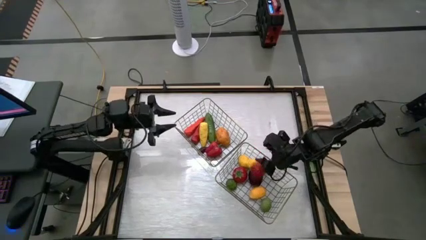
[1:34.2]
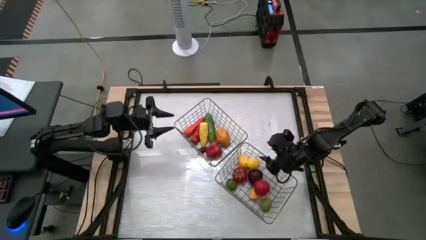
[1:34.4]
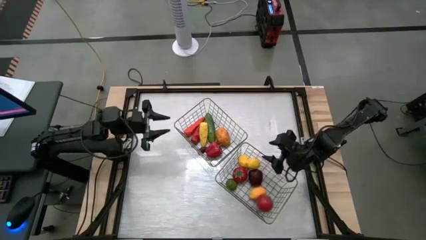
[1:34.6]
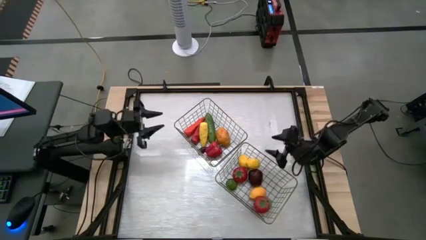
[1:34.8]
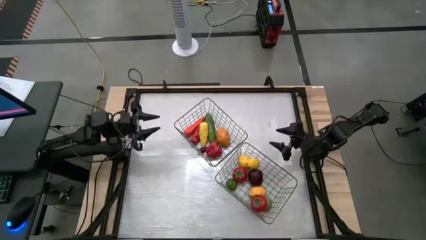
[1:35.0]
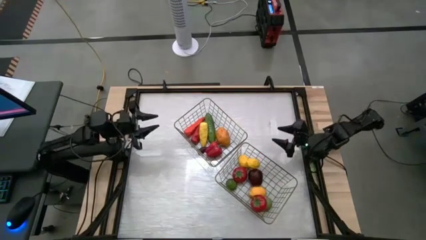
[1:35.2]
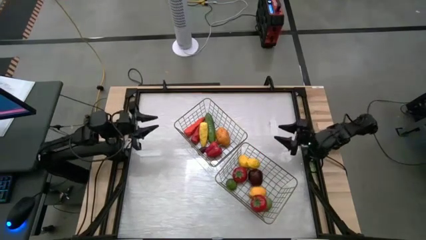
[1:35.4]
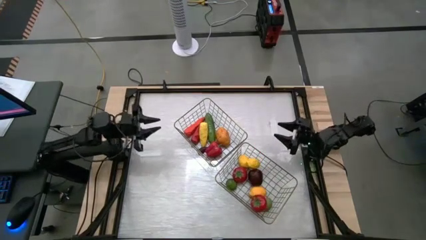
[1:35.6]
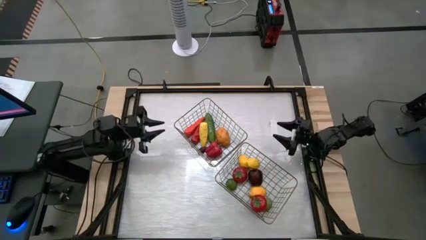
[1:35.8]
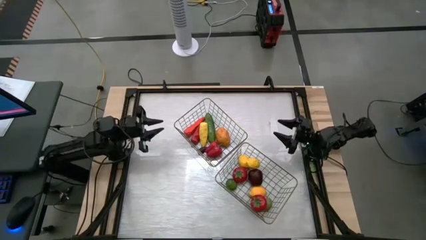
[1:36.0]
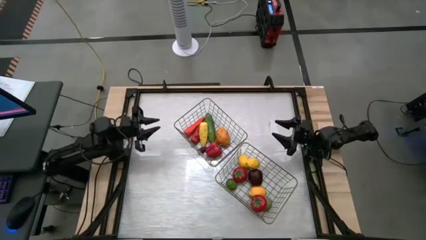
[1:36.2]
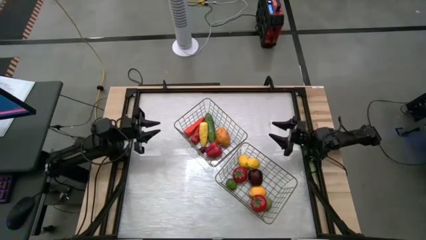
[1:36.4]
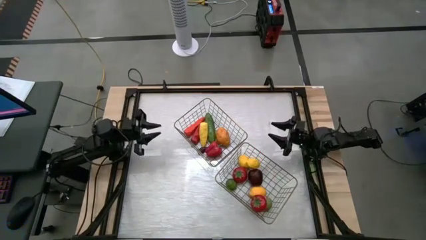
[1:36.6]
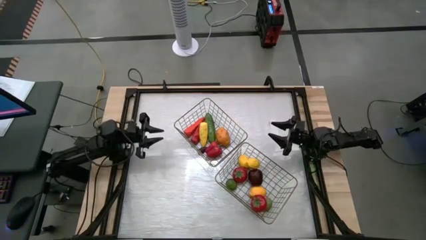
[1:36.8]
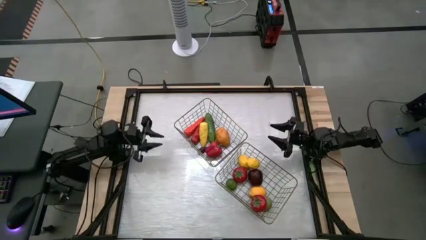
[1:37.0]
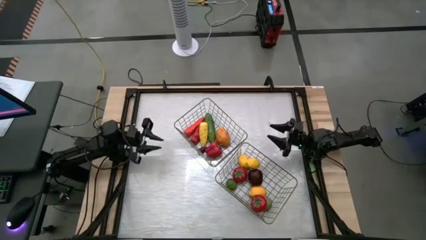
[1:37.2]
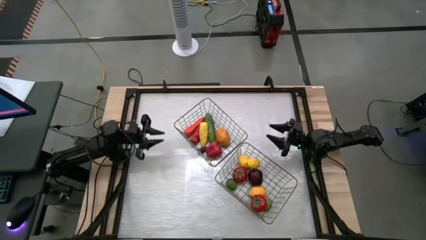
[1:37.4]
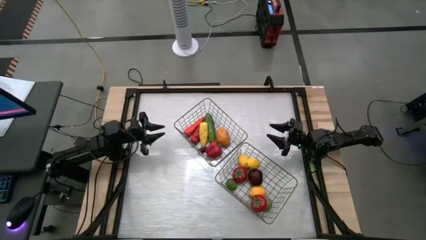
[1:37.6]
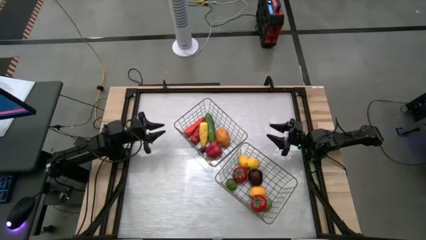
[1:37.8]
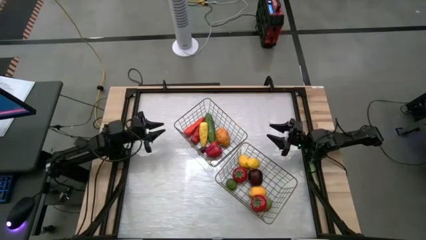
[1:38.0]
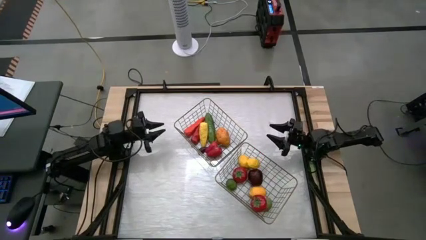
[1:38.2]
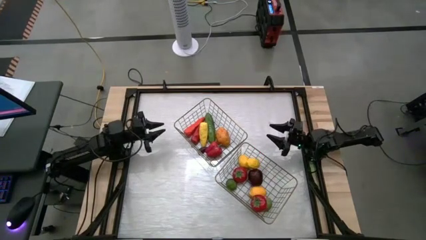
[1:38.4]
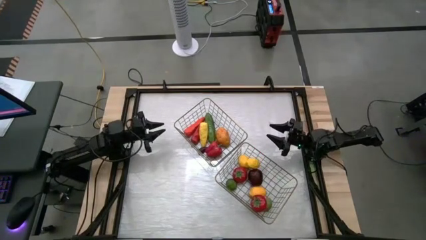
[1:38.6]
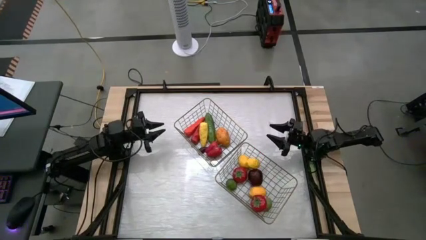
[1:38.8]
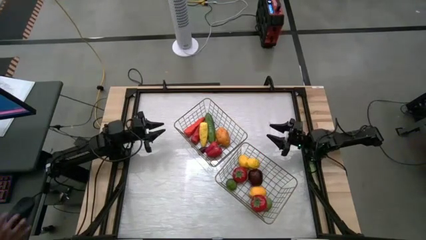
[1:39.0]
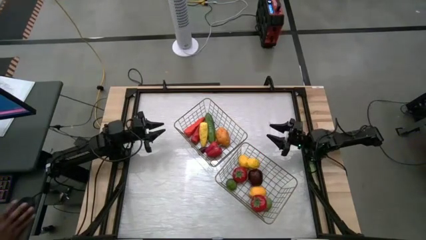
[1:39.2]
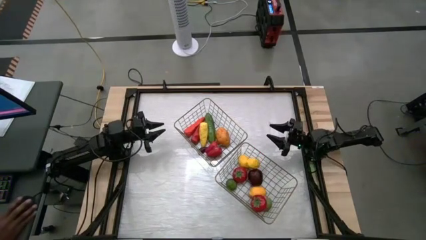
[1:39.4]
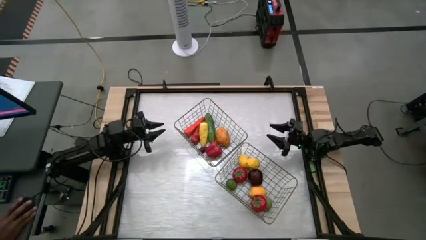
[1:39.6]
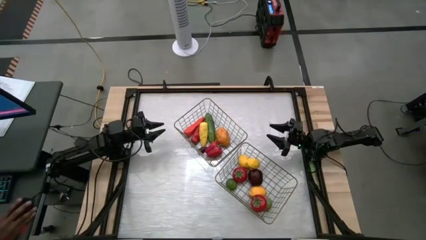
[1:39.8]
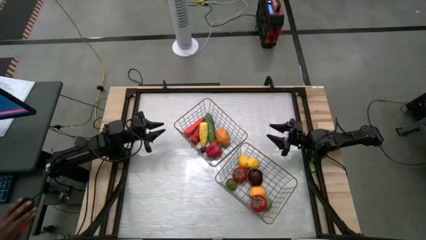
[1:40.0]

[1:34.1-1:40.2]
Task: Sort produce into baskets
Return to Home Position

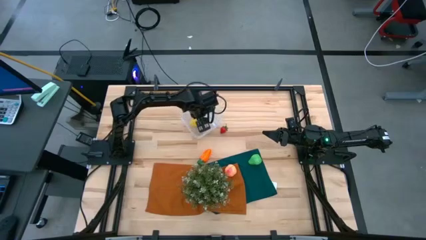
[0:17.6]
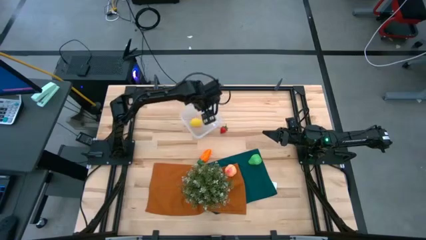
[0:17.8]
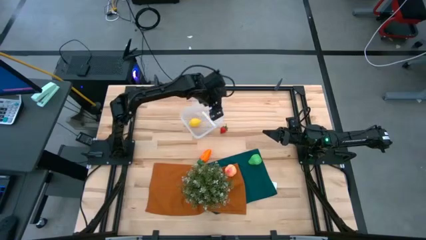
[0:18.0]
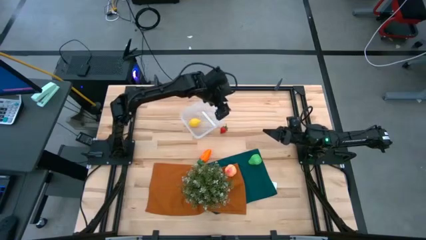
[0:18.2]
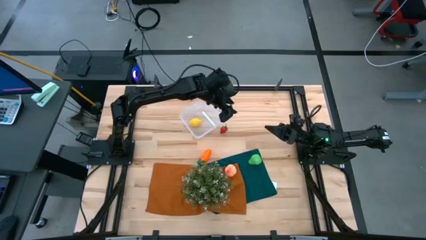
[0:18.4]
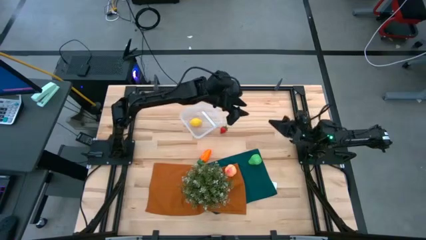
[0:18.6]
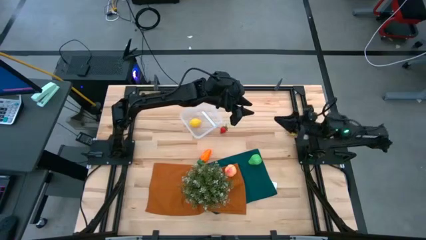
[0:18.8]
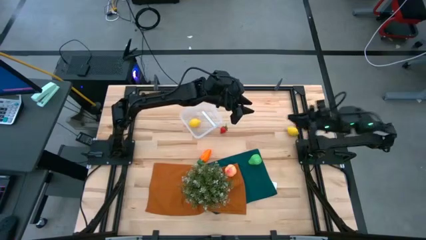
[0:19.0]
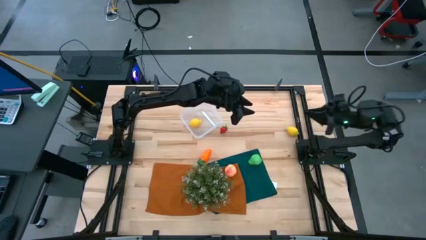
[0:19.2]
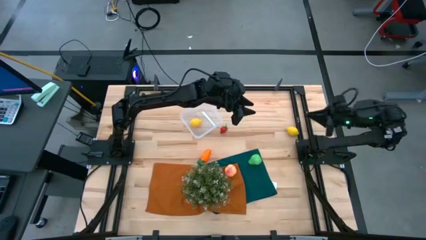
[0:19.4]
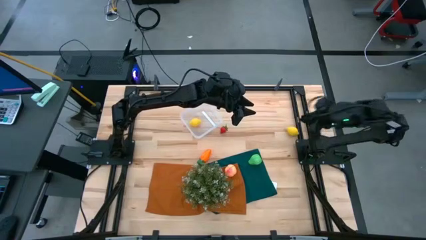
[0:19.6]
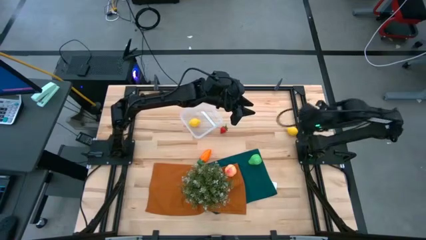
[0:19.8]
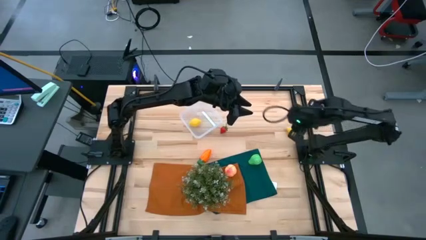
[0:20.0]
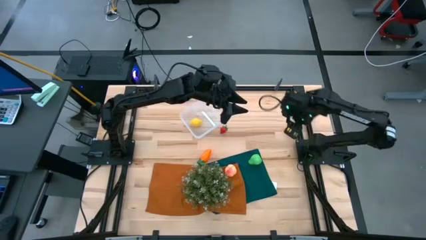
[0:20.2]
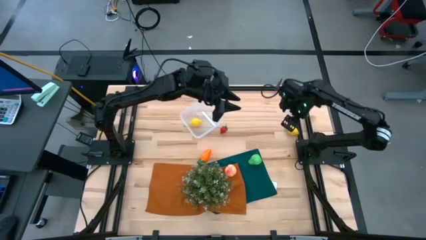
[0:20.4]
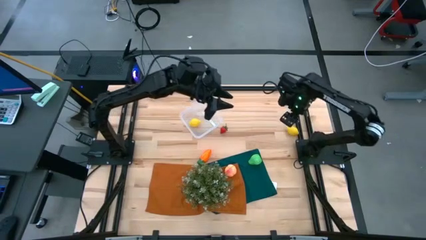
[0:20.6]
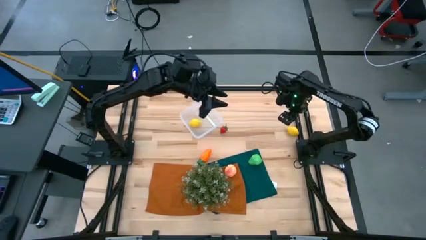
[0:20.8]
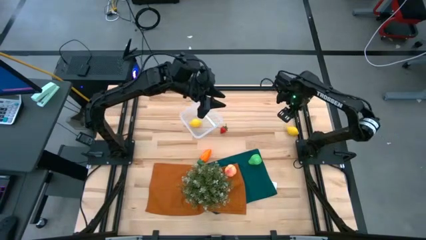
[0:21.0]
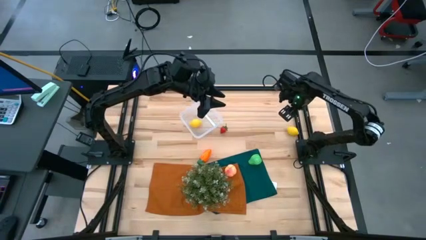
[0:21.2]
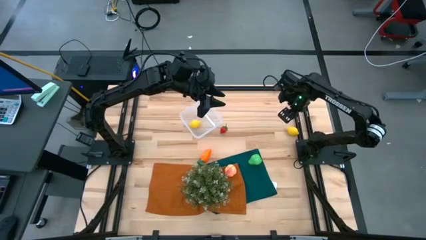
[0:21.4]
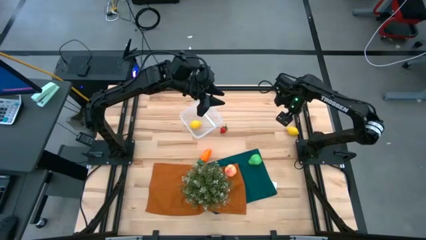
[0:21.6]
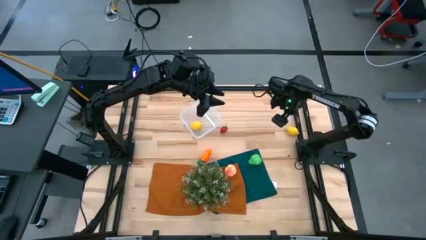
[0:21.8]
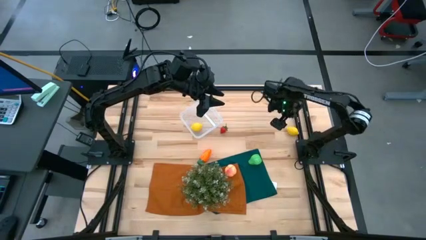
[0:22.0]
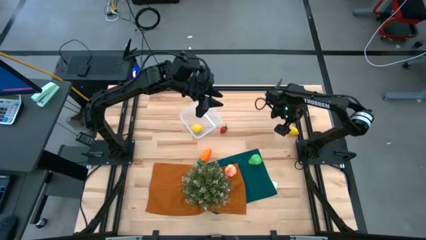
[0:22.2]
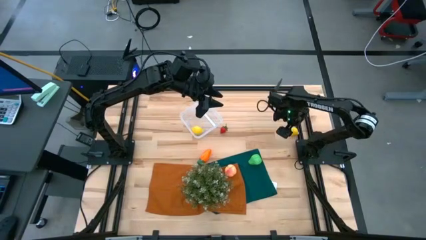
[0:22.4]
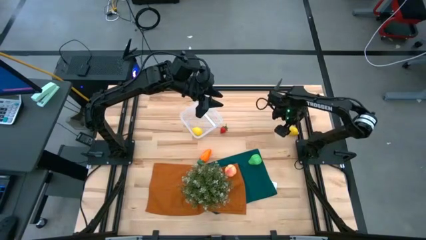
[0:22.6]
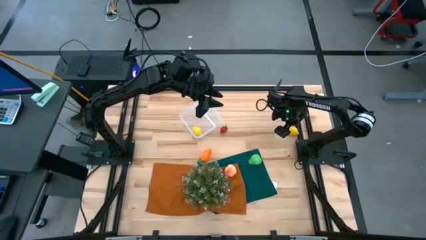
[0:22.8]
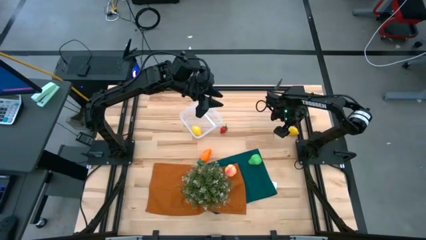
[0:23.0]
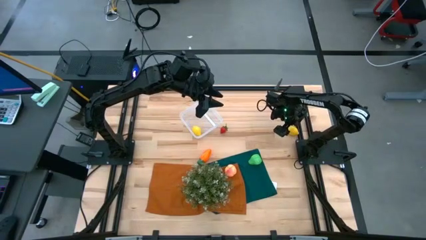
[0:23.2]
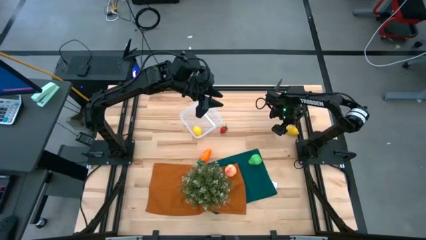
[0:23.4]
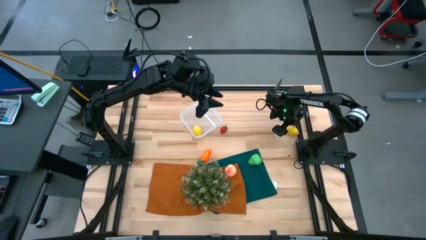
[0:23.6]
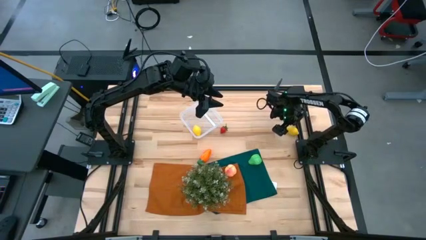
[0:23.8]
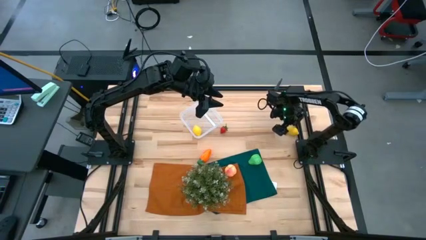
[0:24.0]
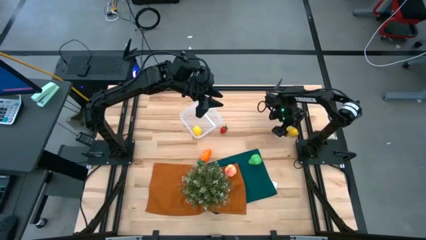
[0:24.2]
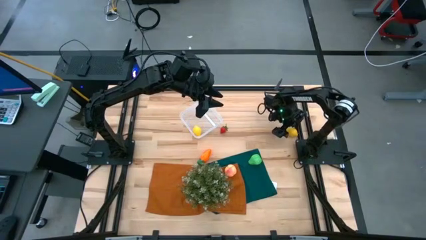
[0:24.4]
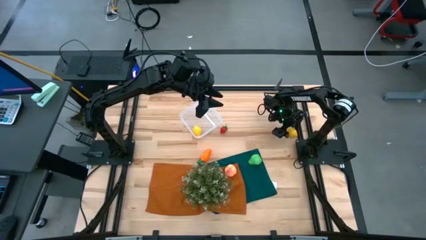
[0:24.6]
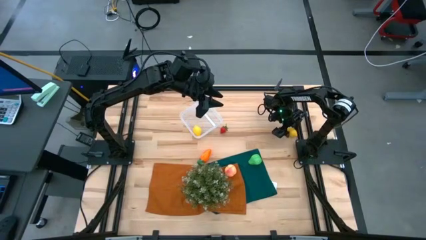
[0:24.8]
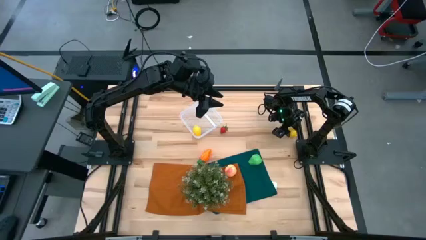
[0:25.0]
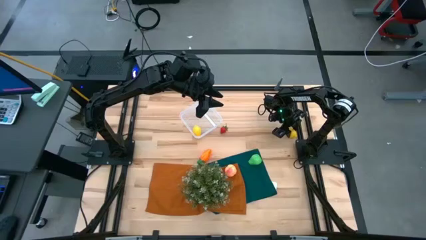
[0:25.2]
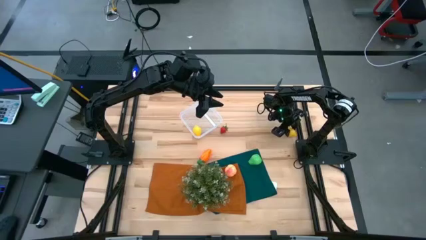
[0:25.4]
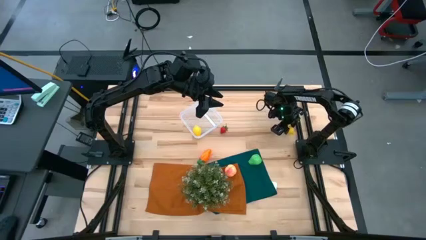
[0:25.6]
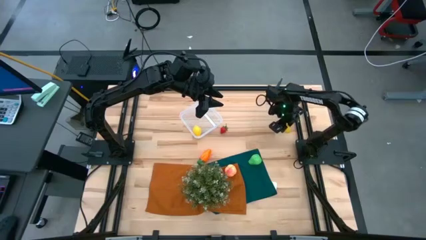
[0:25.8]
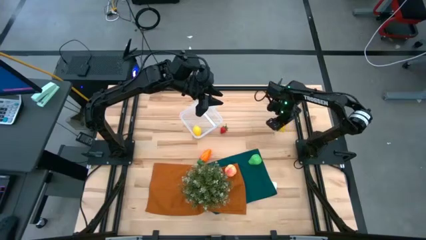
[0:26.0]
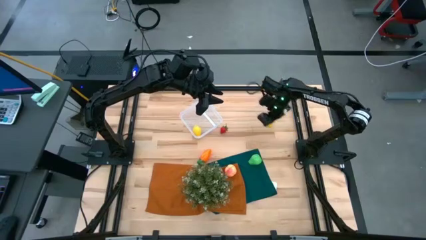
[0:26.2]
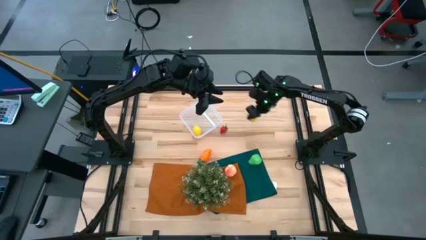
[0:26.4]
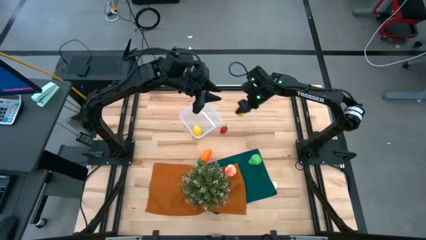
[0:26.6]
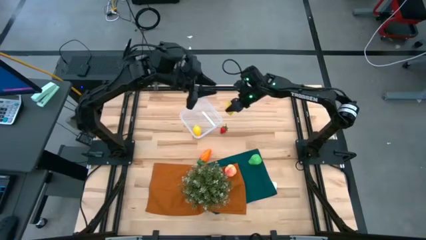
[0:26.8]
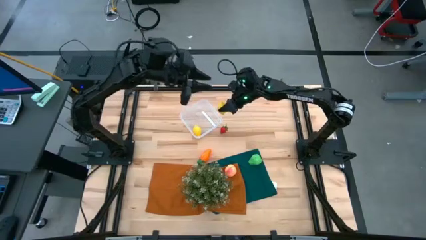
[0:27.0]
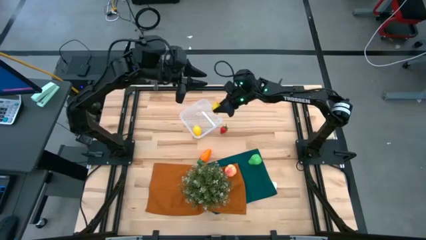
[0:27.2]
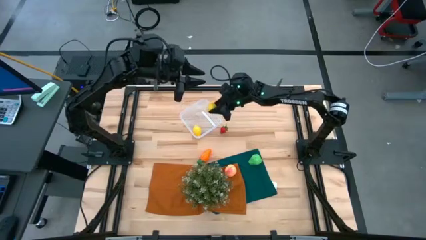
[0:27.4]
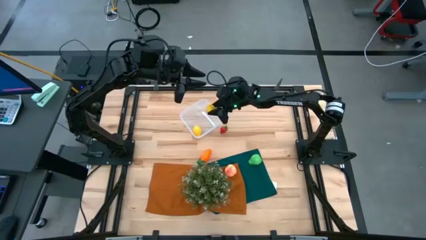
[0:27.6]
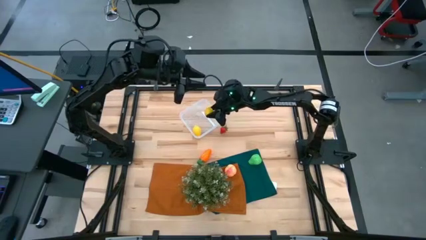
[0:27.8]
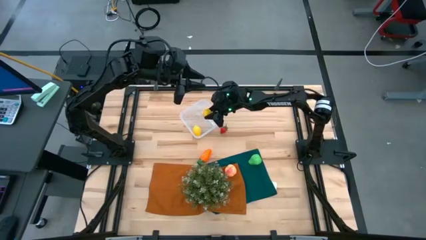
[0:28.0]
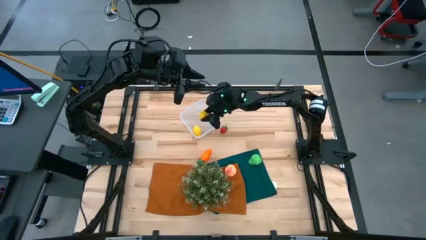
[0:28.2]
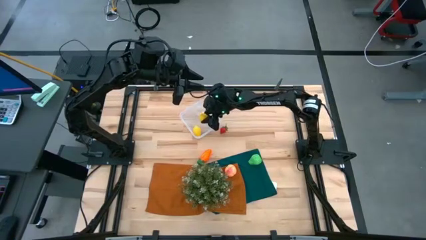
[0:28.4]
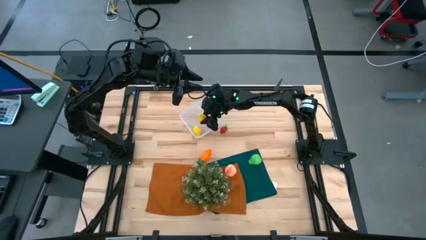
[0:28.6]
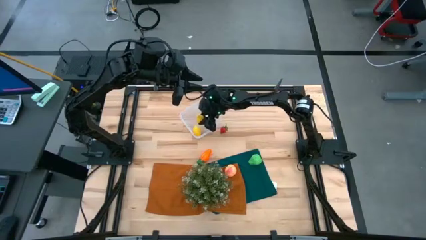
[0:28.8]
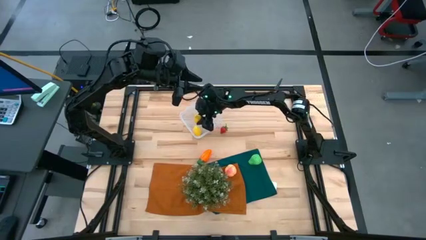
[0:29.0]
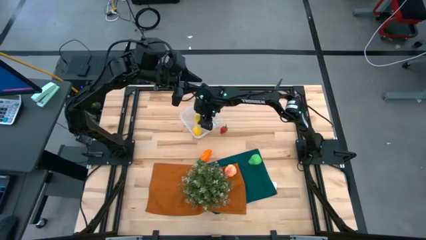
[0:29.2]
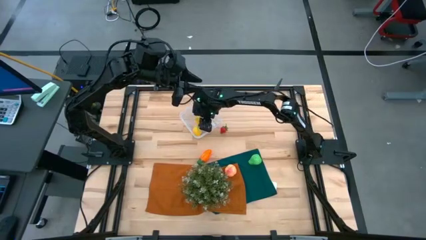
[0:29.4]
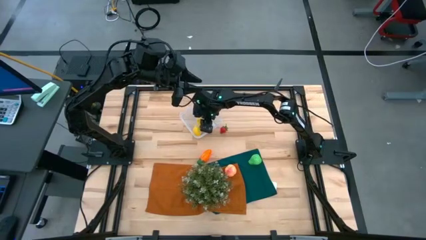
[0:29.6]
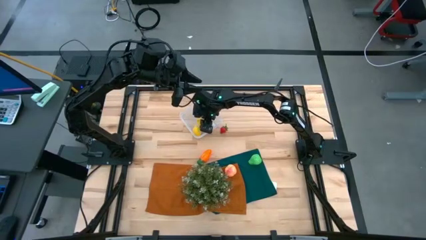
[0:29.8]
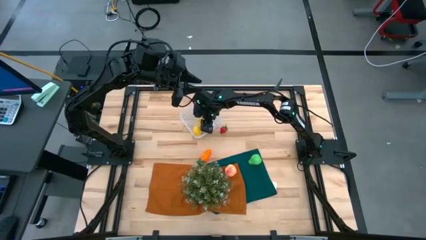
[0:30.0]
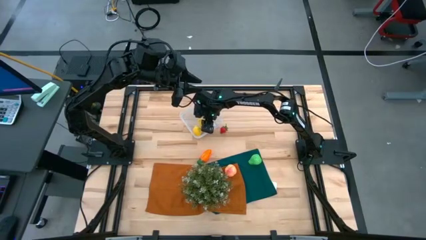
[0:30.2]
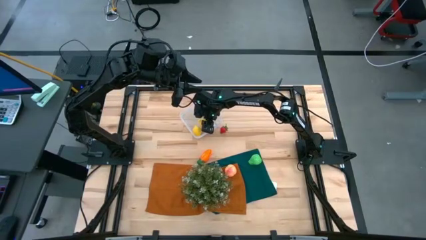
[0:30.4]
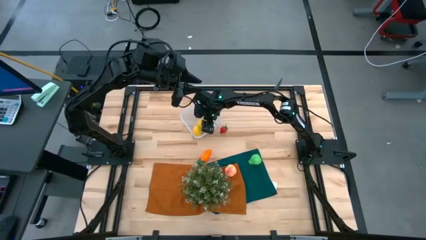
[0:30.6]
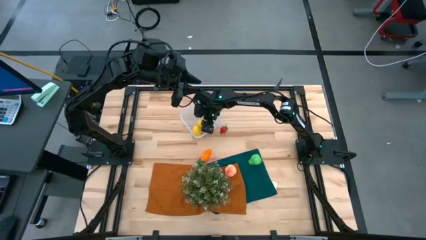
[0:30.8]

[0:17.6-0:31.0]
Task: Pick and placing Produce into tupperware
Put the lemon into the transparent container
